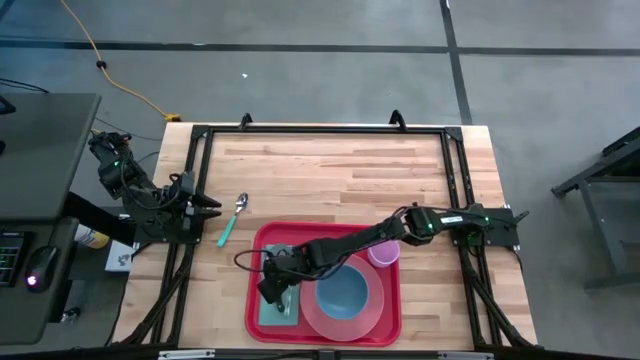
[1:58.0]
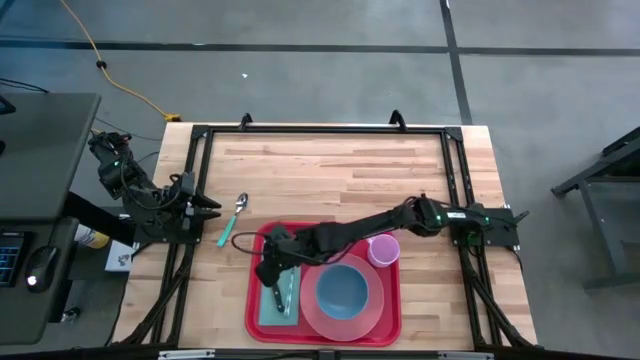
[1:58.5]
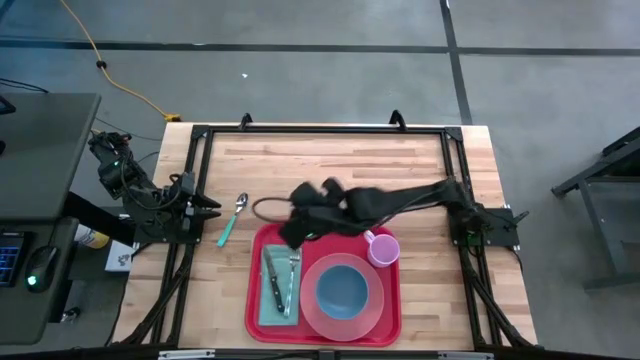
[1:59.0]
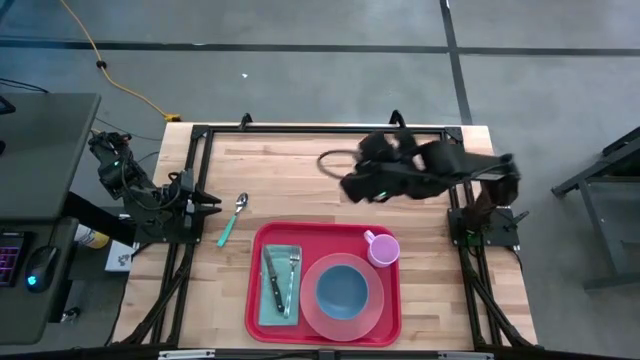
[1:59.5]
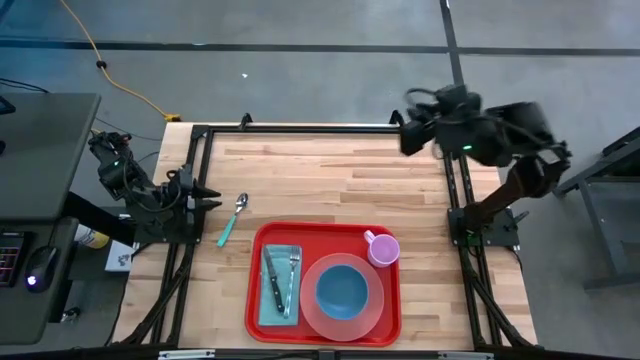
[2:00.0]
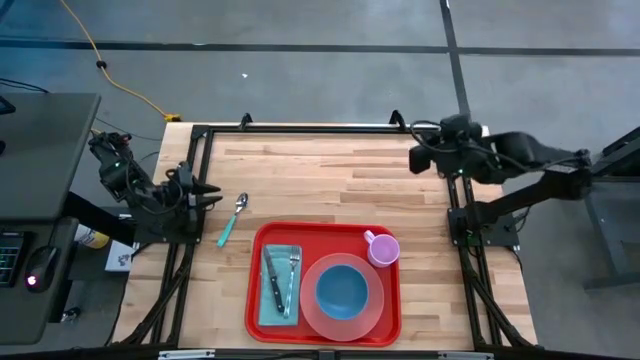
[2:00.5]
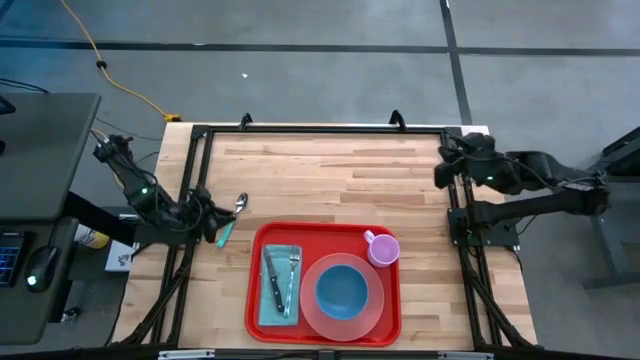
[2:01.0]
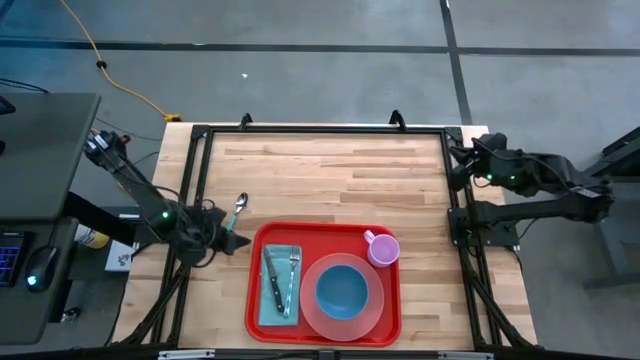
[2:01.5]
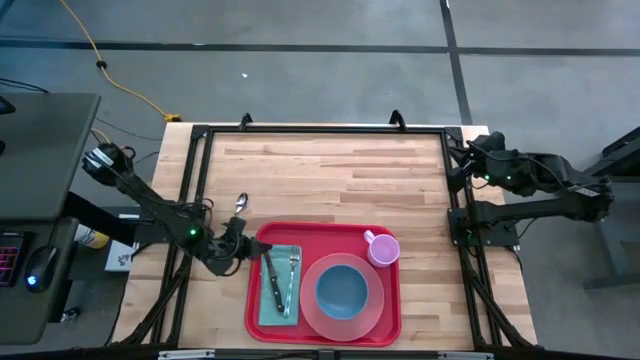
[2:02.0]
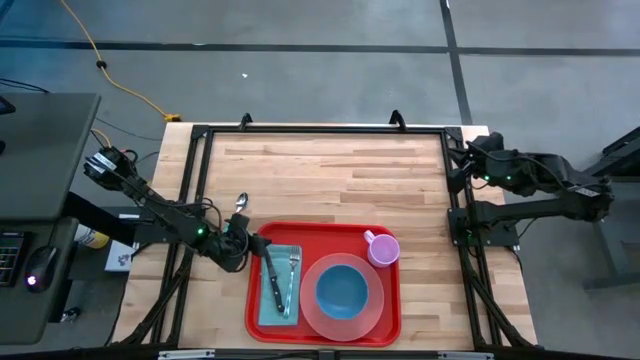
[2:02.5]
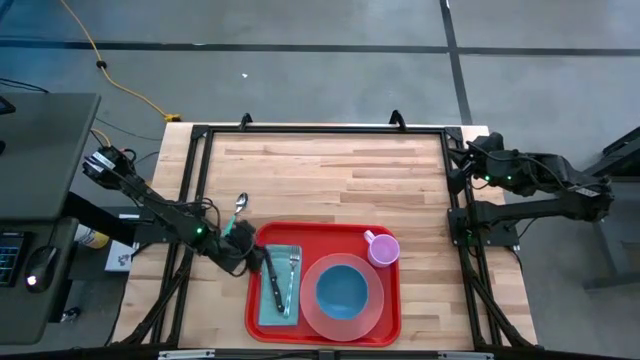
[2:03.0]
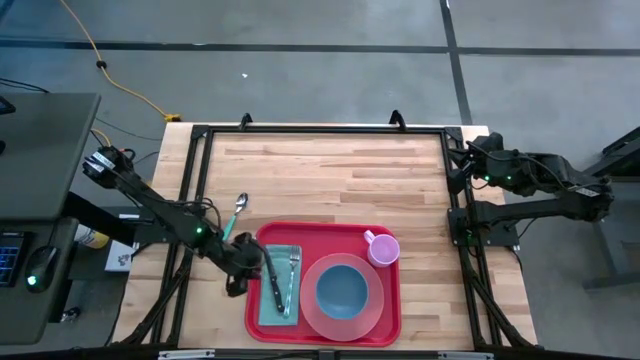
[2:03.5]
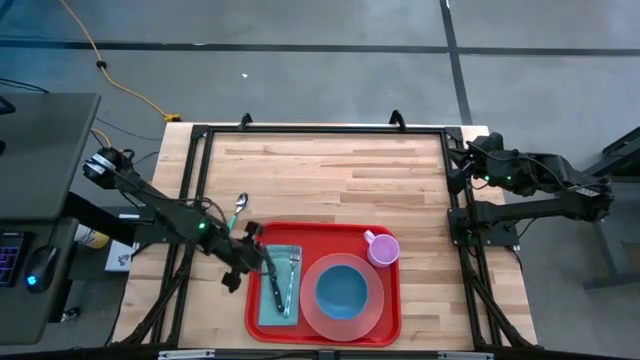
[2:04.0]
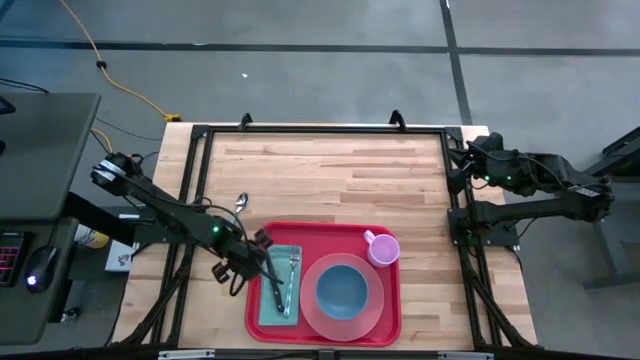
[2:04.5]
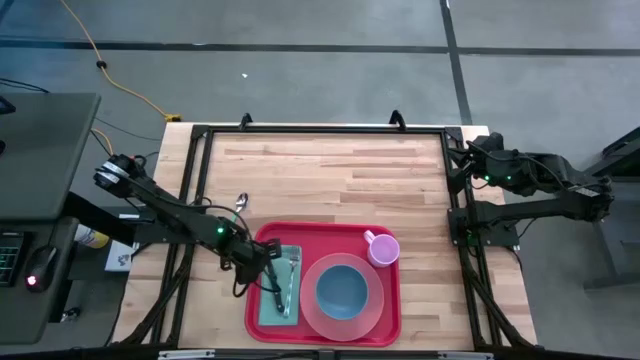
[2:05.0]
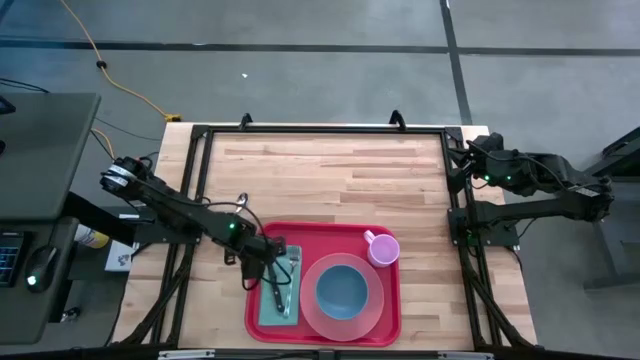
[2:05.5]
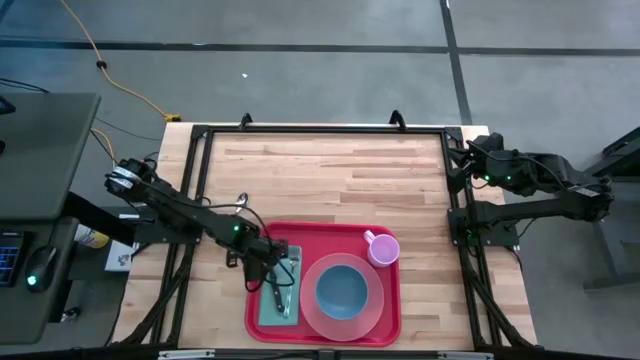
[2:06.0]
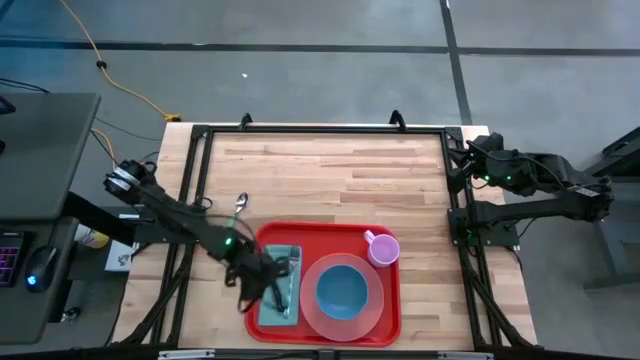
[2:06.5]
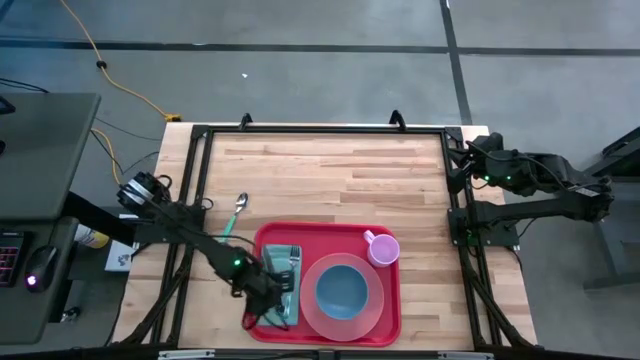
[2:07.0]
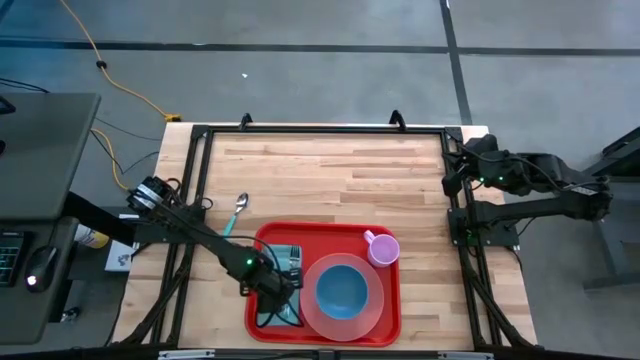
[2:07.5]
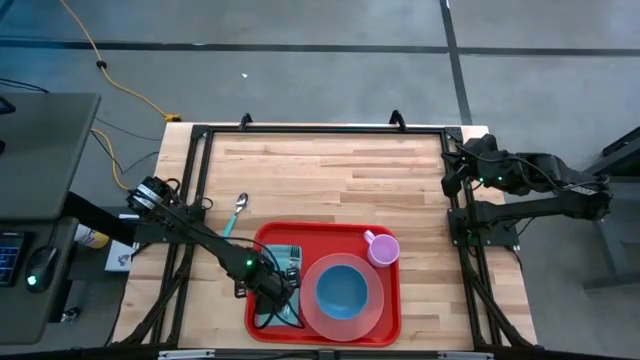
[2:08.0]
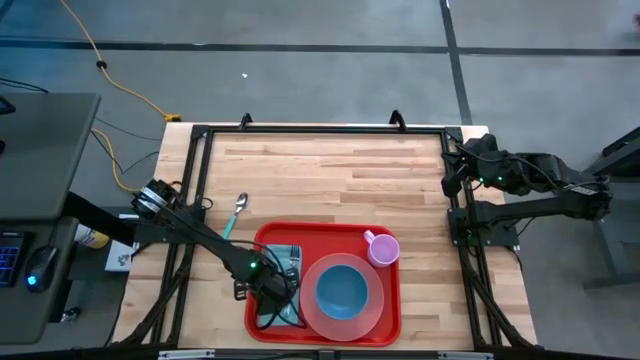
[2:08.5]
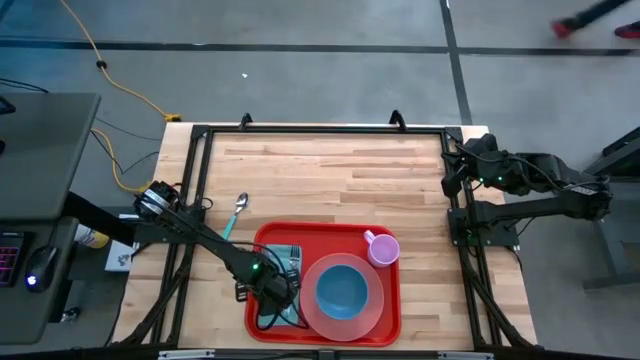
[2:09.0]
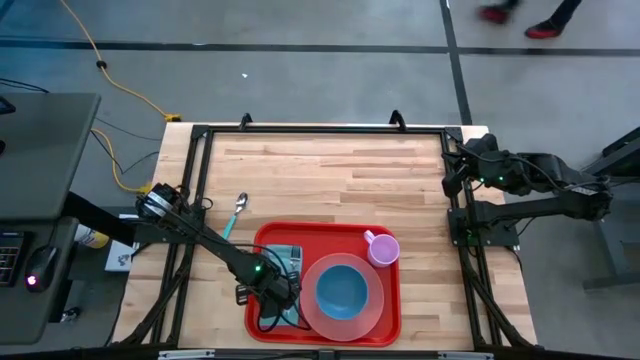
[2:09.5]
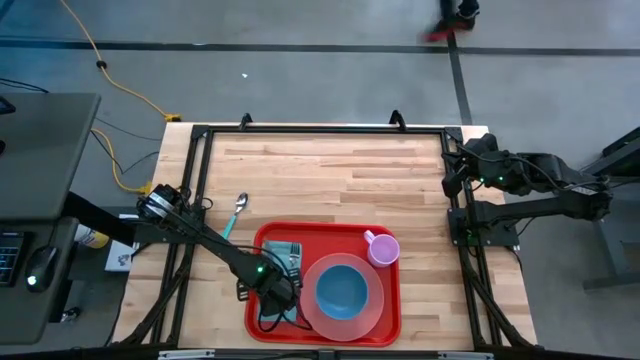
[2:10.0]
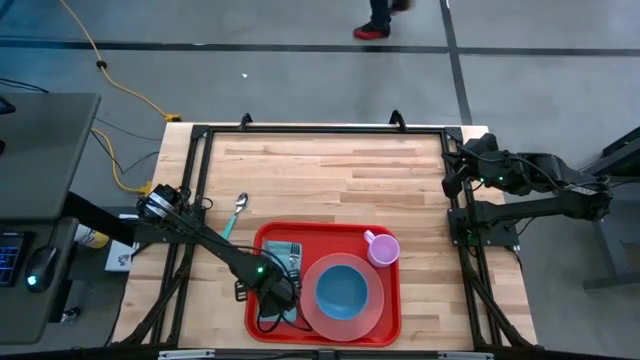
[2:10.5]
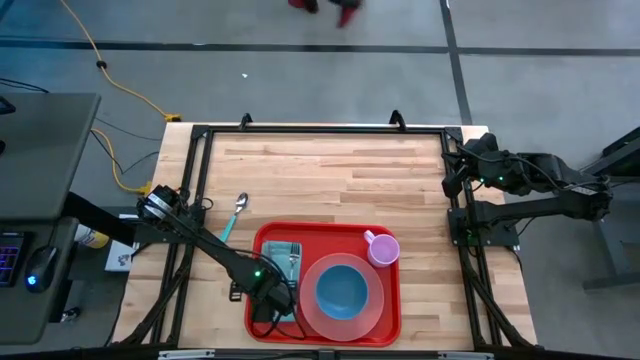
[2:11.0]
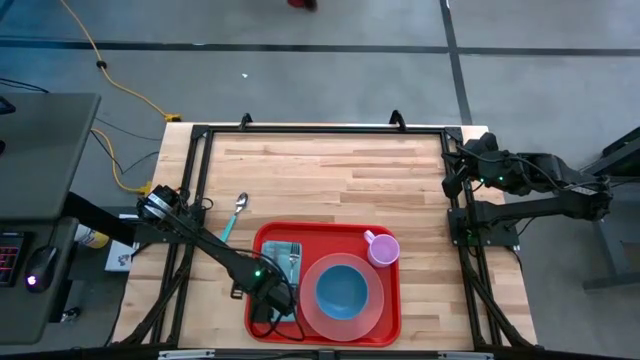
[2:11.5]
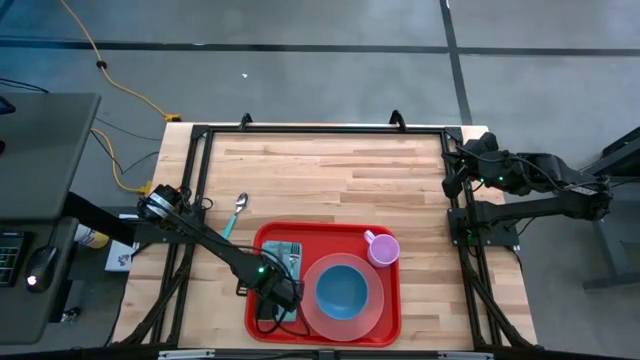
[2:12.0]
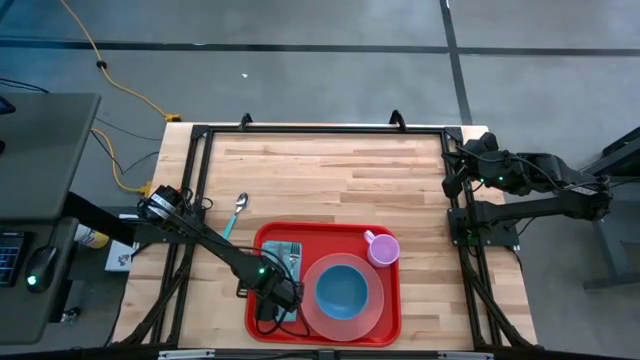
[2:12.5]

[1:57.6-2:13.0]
Task: Set up tray
Put the black knife on the blue napkin to the left of the blue patterned fork

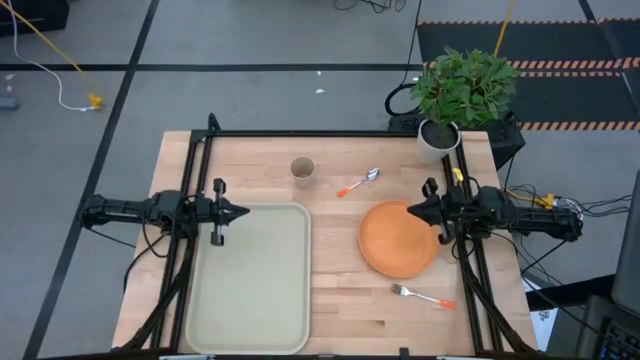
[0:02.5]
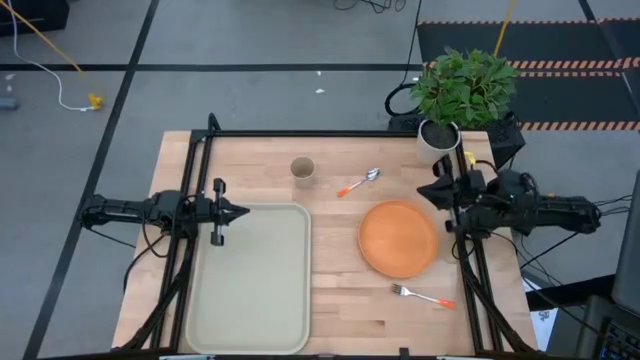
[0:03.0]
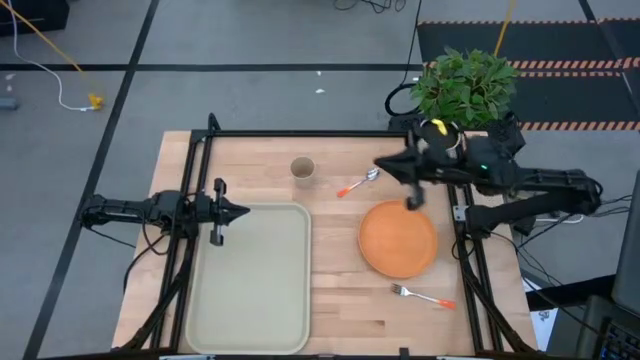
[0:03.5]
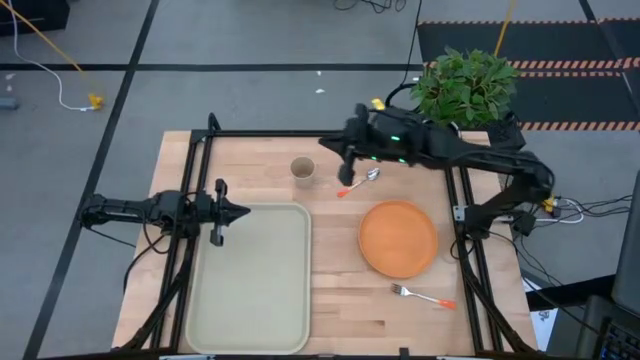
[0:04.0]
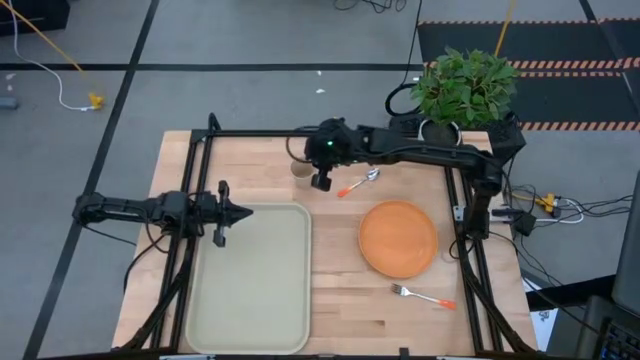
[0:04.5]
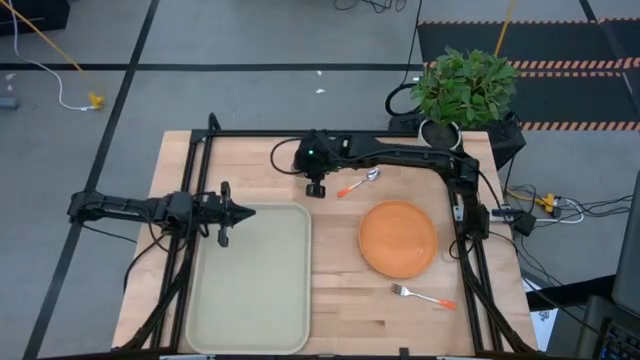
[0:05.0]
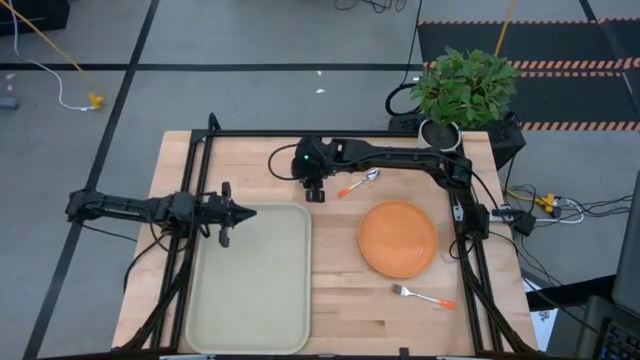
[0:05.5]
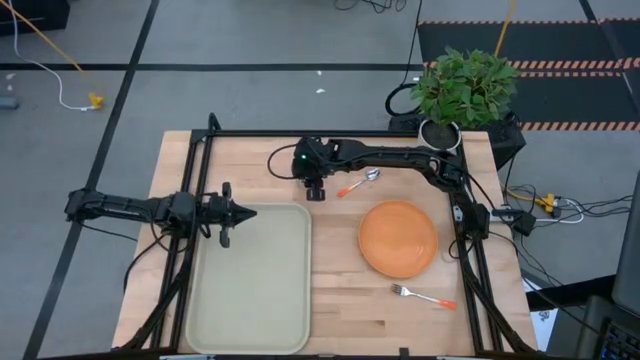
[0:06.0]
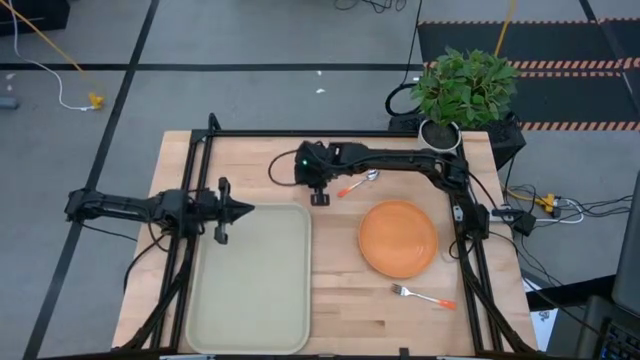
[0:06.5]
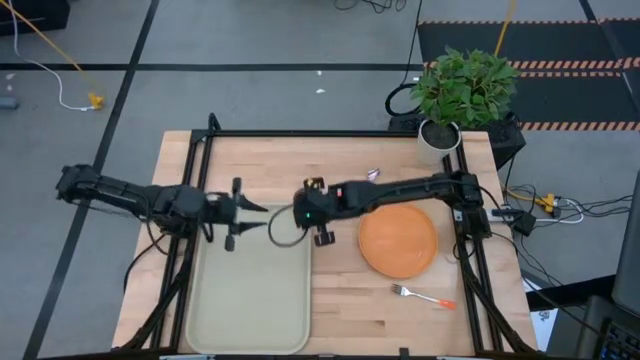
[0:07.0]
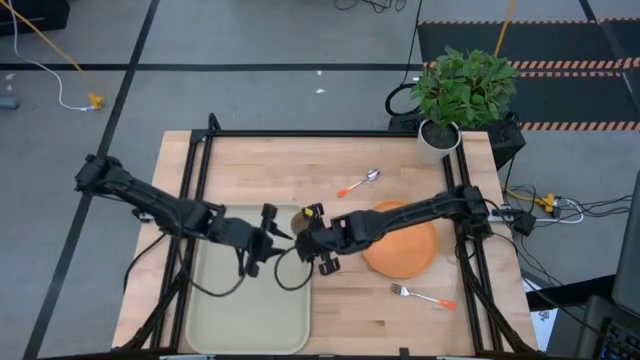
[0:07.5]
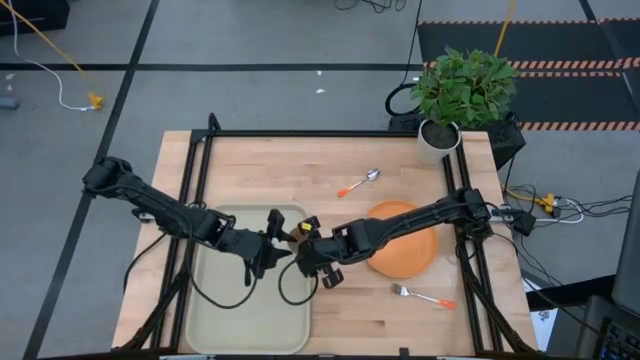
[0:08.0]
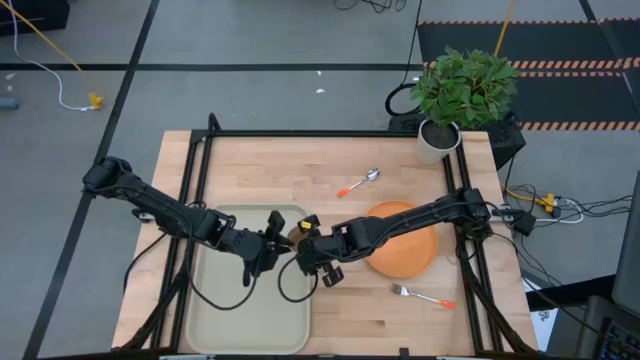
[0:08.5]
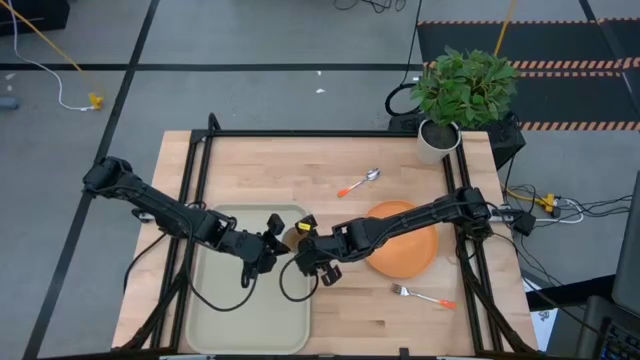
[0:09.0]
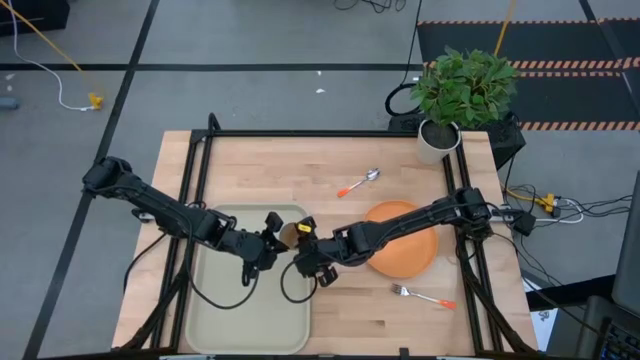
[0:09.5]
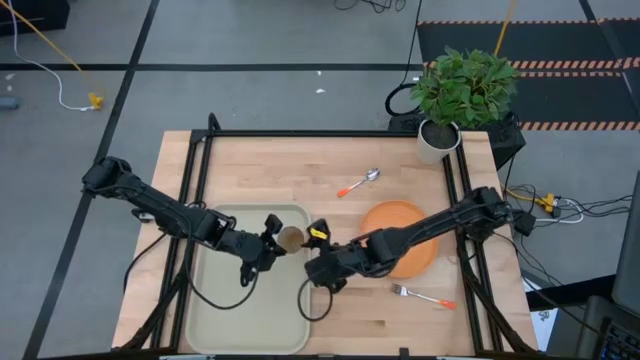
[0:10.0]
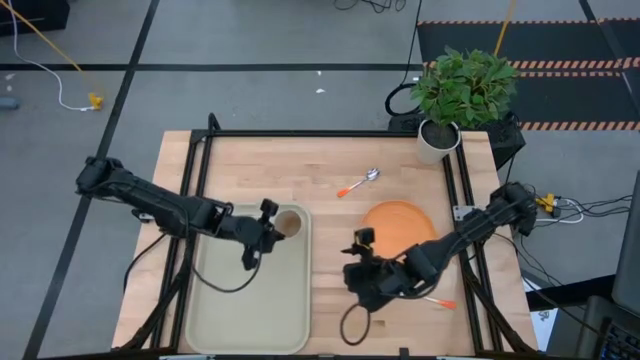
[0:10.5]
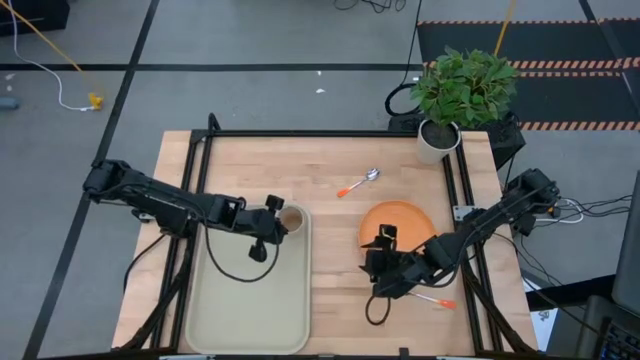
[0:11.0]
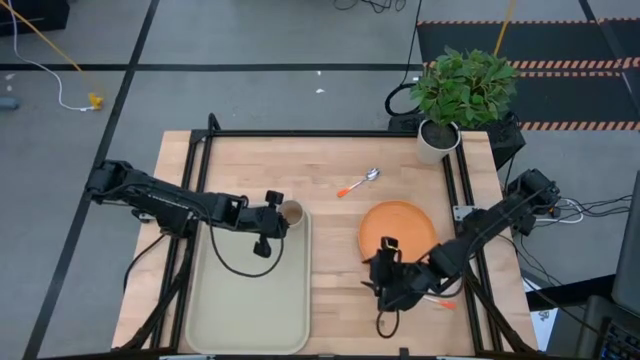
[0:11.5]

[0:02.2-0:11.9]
Task: Pick and place plate/cup/fork/spoon on tray
Put the light yellow cup on the top left of the light yellow tray
